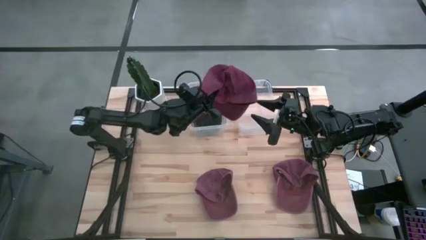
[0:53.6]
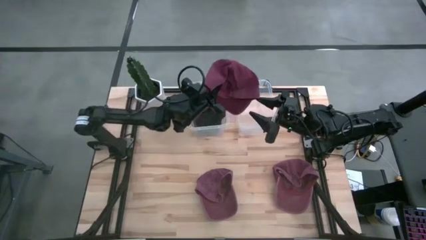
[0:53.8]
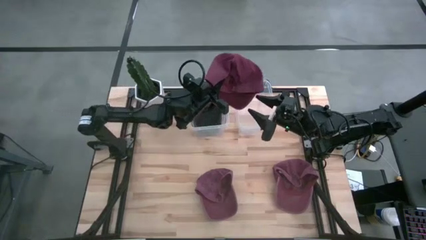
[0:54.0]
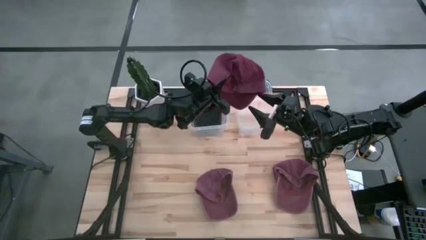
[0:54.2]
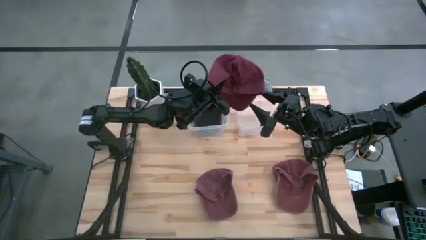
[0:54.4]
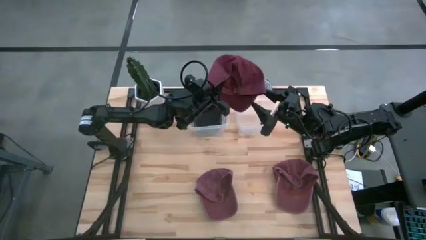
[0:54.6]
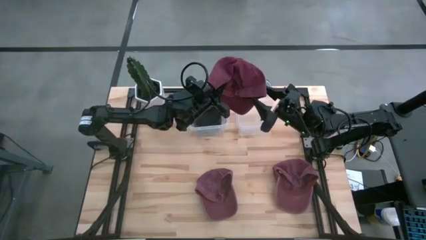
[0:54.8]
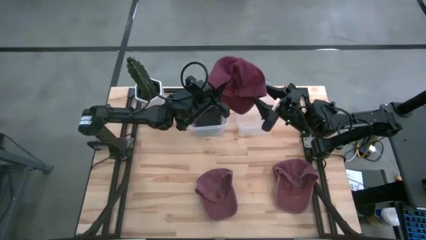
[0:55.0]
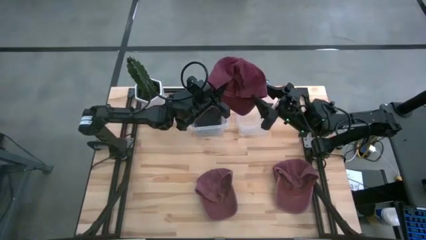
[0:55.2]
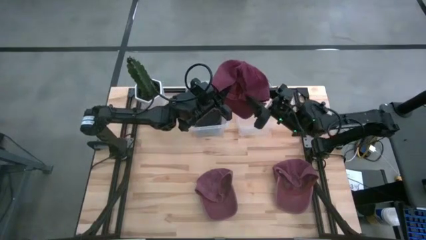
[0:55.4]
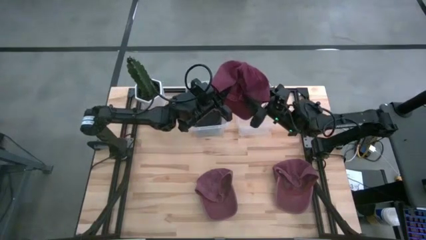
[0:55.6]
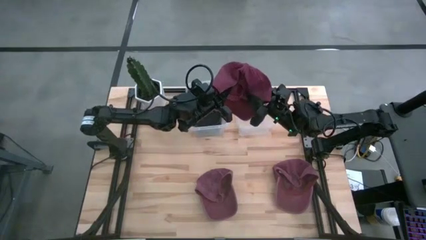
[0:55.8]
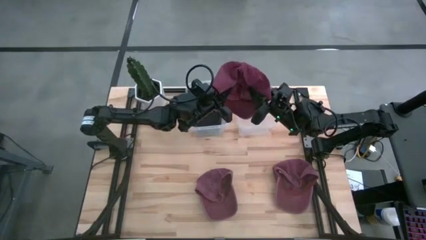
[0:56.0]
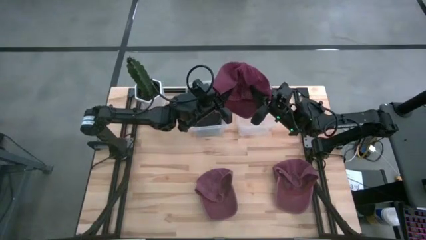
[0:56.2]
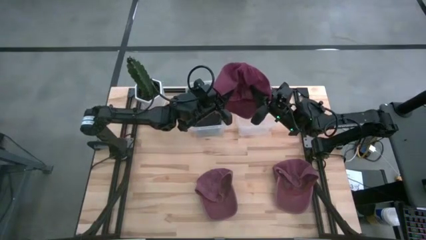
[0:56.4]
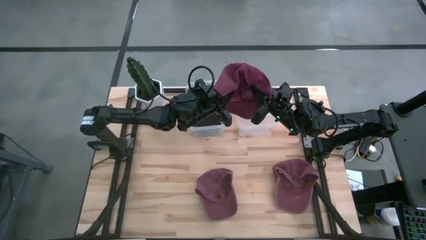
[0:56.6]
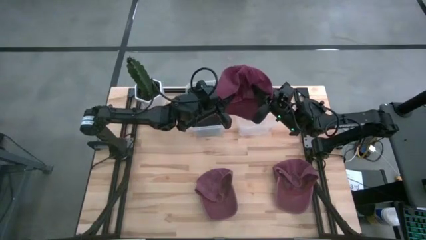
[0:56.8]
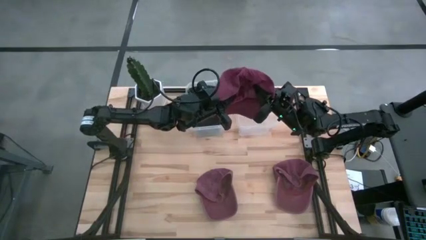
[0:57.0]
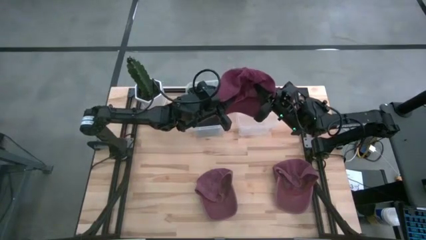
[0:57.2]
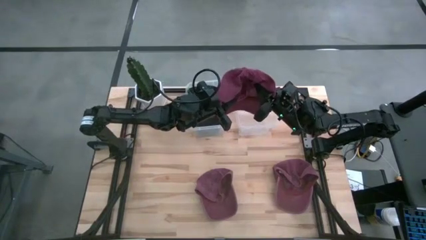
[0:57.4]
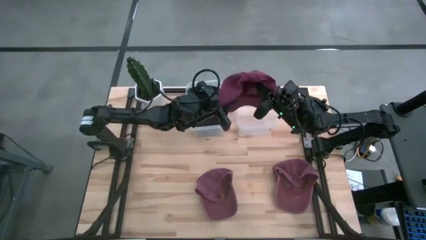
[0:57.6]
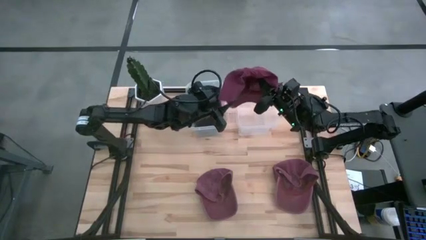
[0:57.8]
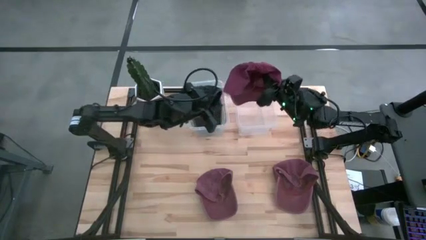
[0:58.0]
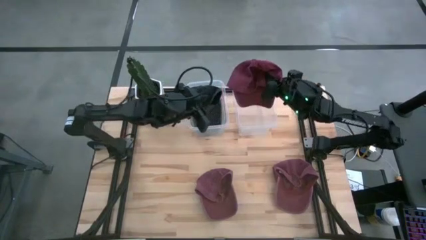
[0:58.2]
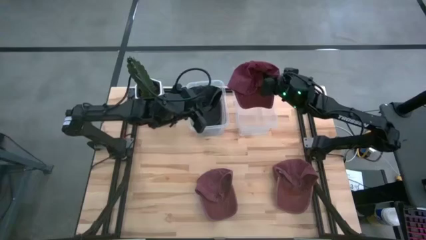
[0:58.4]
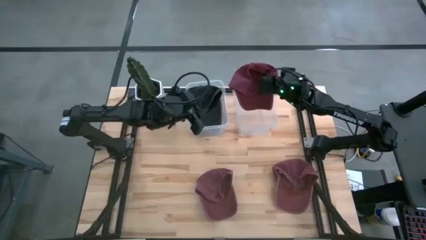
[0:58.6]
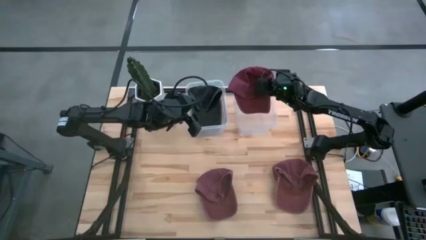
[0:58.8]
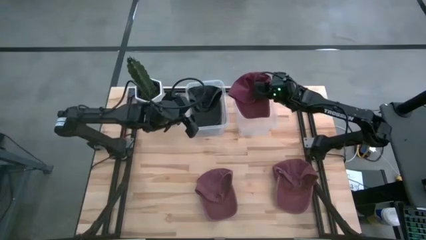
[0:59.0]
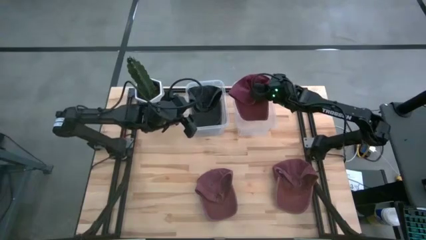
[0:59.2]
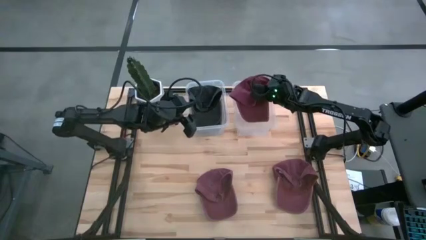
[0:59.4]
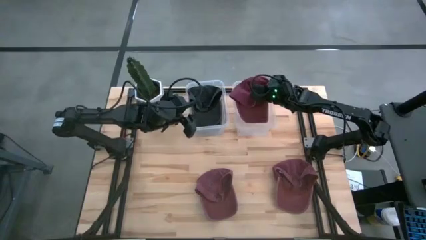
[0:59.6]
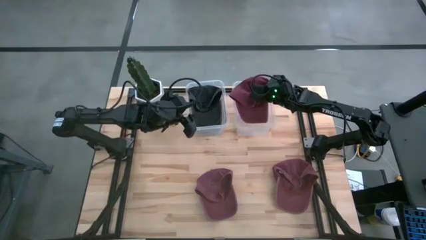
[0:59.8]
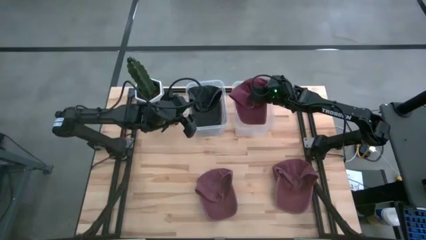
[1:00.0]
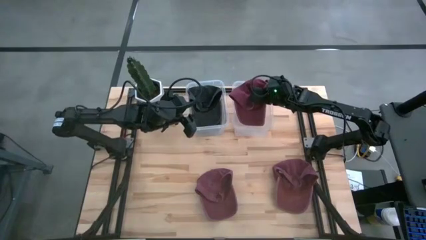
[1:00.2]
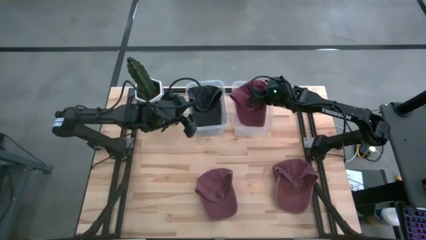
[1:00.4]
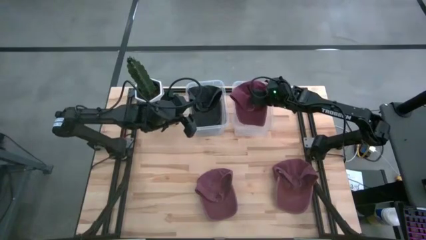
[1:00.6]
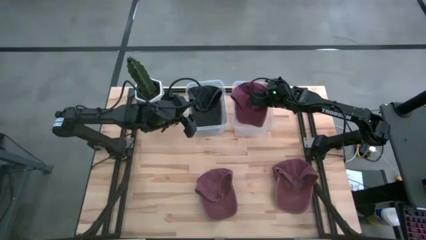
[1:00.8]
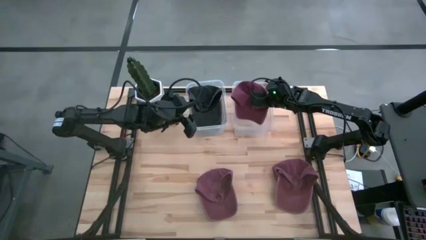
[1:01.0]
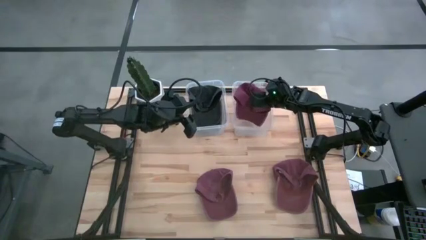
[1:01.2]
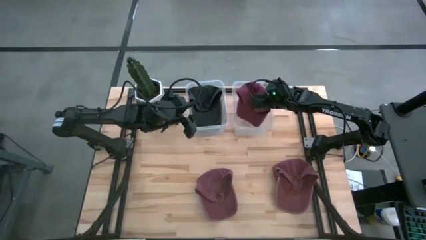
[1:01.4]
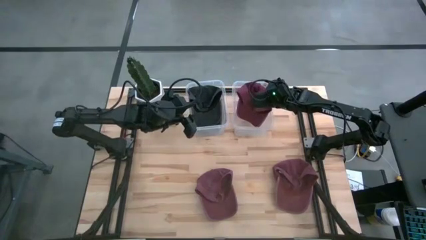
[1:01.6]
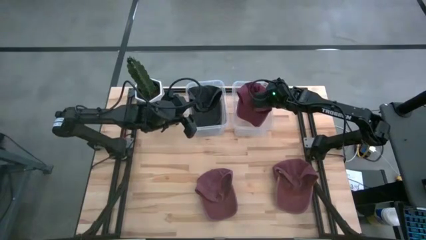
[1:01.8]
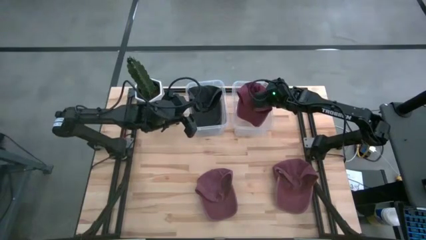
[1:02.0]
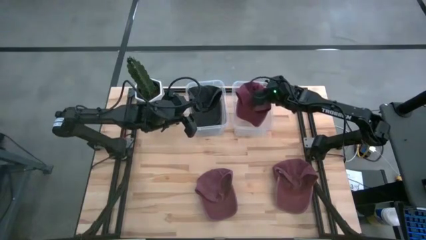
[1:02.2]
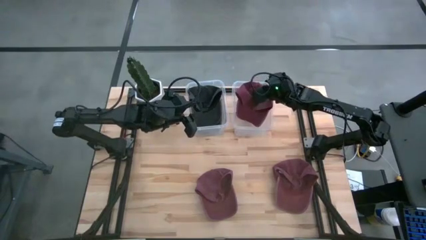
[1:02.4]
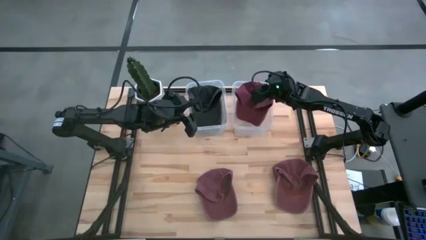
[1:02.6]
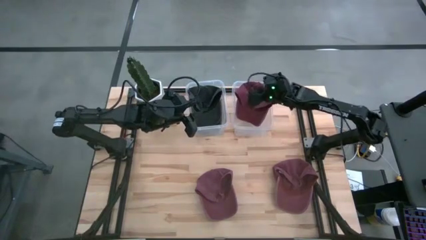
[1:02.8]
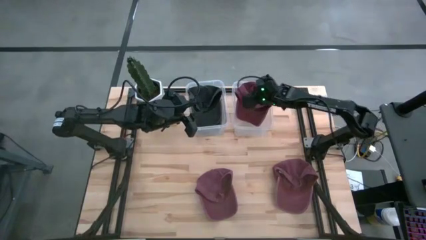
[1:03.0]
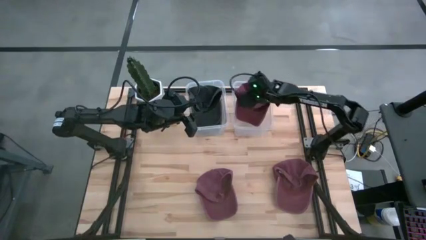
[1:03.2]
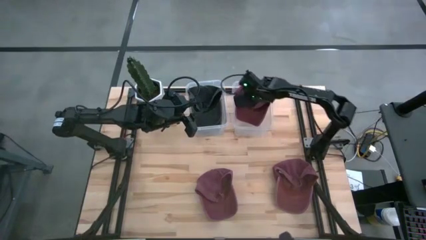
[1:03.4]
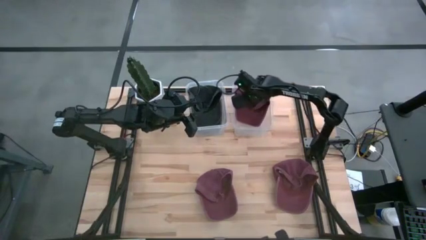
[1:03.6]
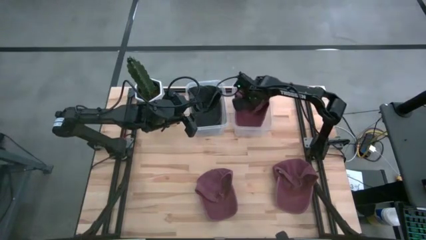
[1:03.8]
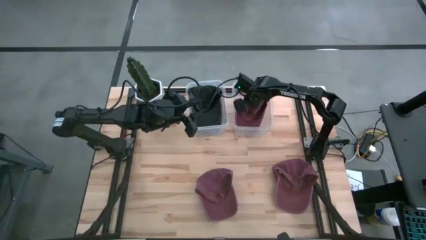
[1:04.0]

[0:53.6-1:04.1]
Task: Pick & Place hat
Put the top pink cap into the right transparent bin
